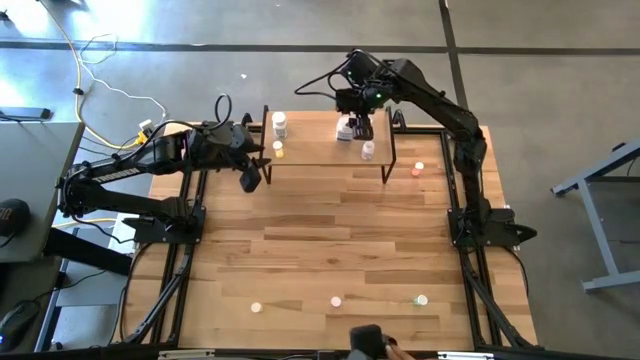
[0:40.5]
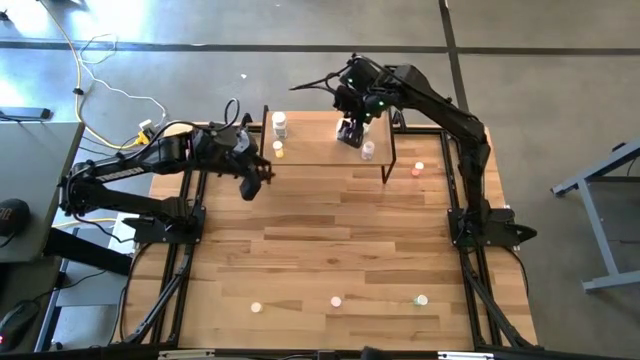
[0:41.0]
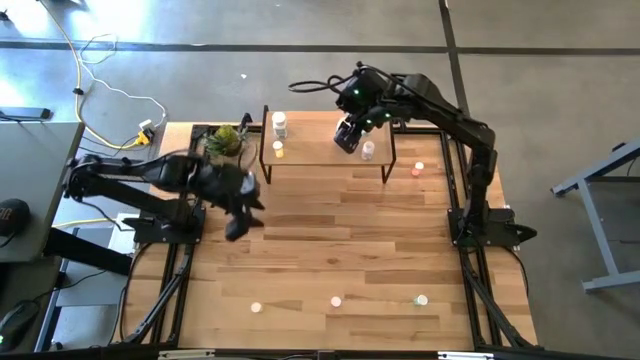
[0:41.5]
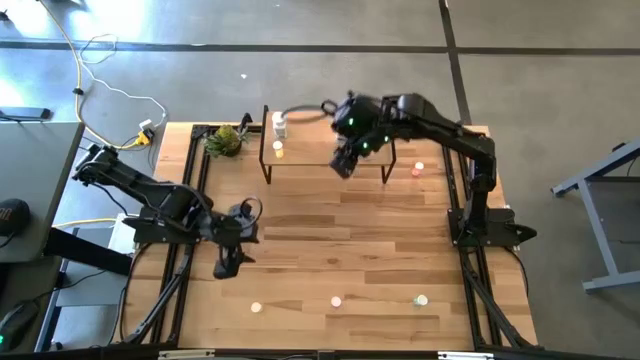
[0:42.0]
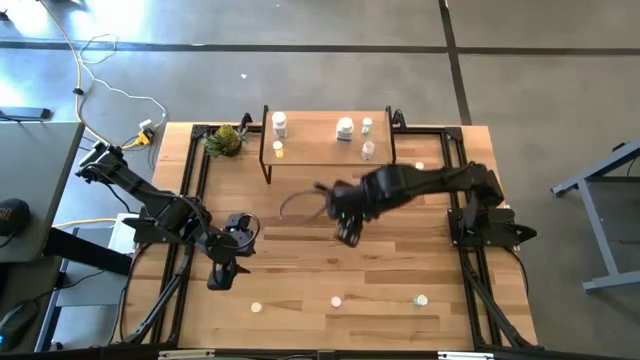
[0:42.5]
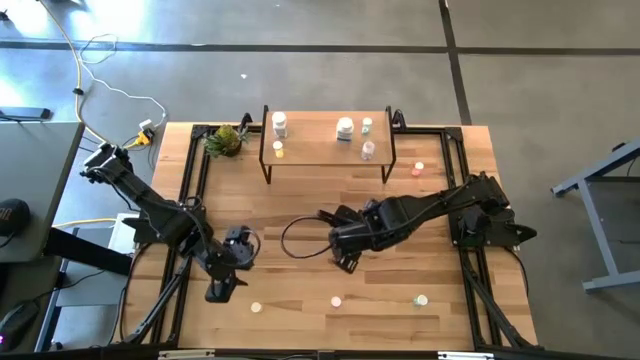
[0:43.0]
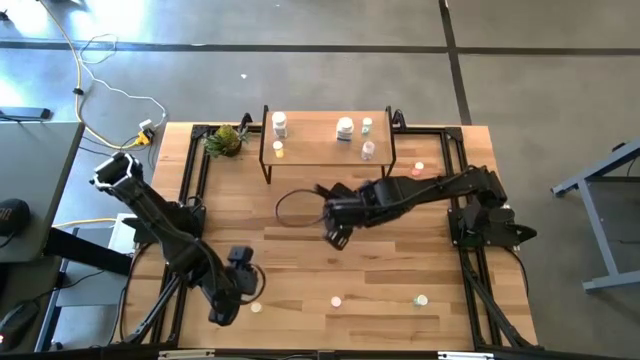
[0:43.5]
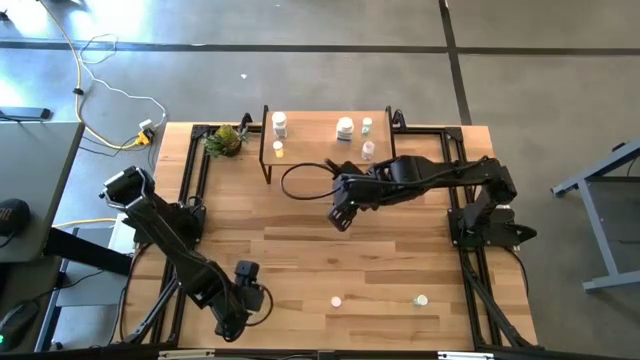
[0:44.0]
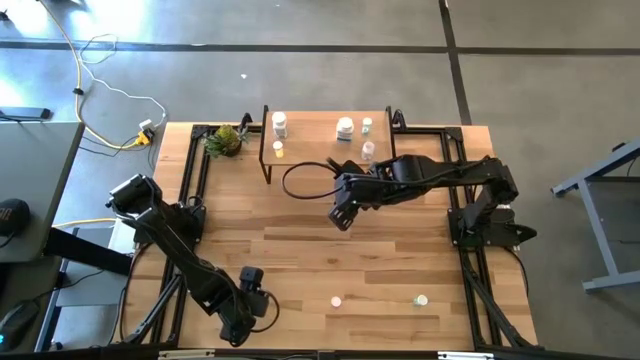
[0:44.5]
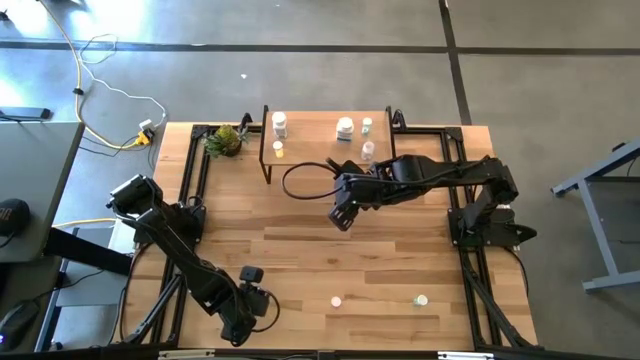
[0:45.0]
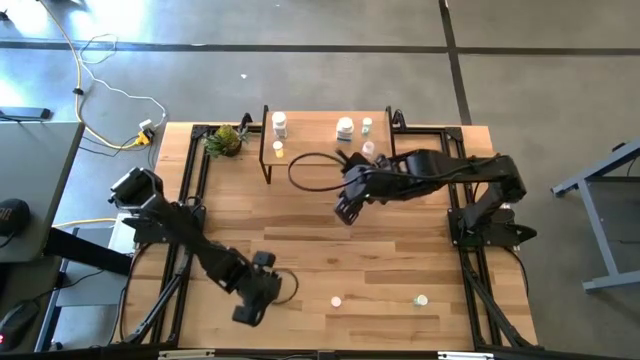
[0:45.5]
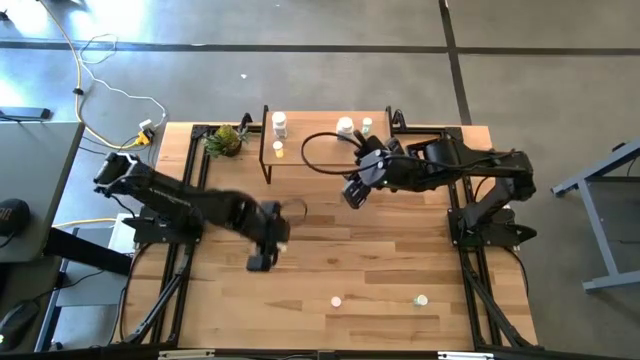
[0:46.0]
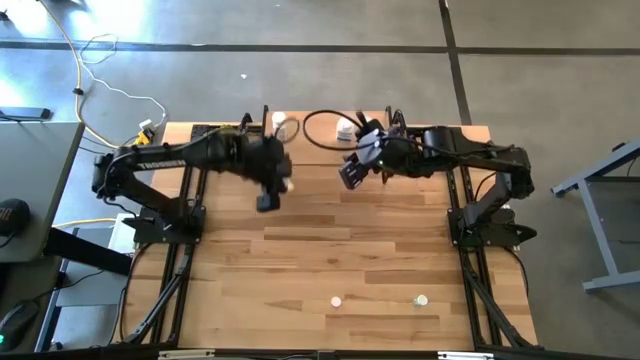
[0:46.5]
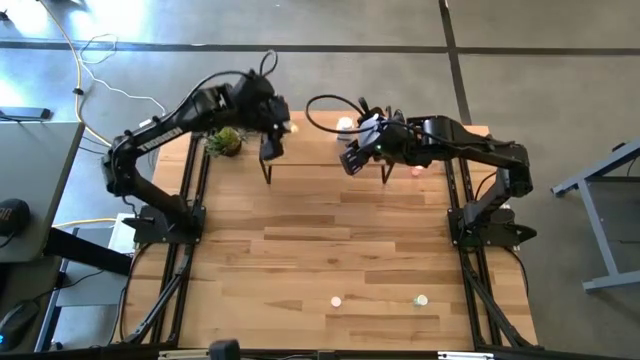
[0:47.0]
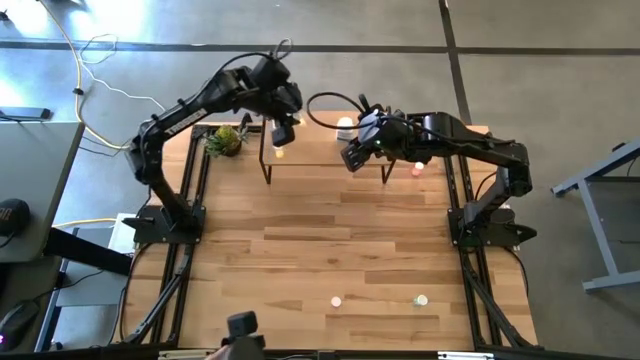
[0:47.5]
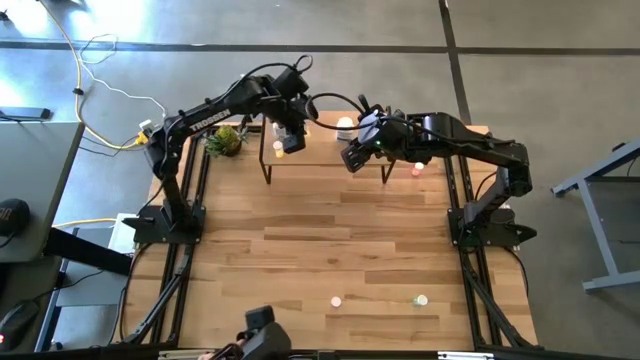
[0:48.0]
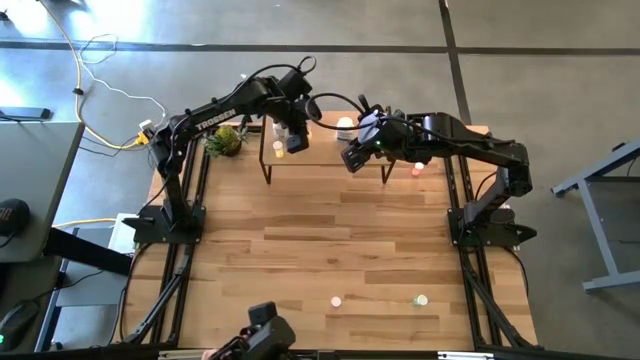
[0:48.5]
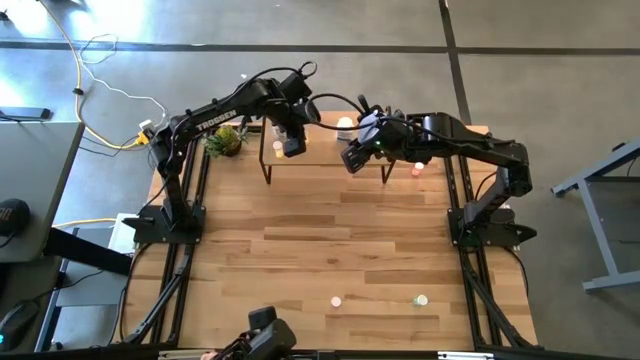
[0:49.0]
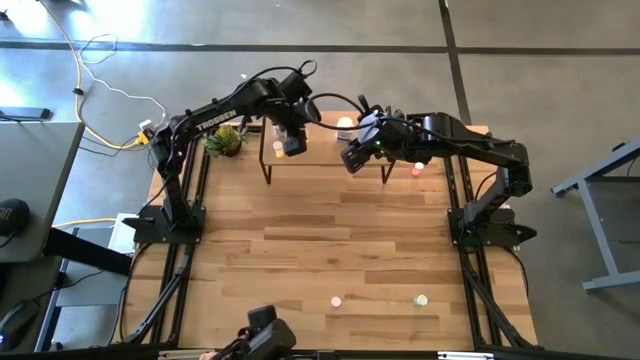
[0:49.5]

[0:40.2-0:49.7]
Task: Pick and place medicine bottles onto shelf by color
Put the yellow pill bottle on the shelf

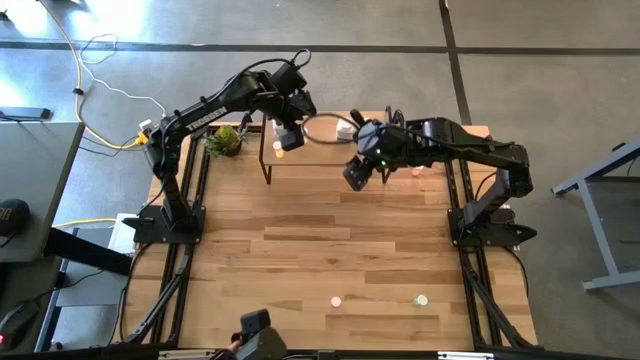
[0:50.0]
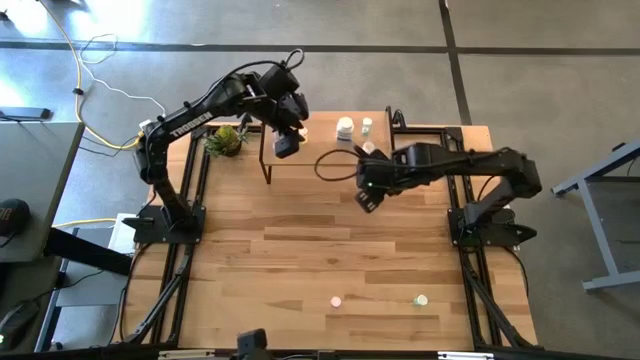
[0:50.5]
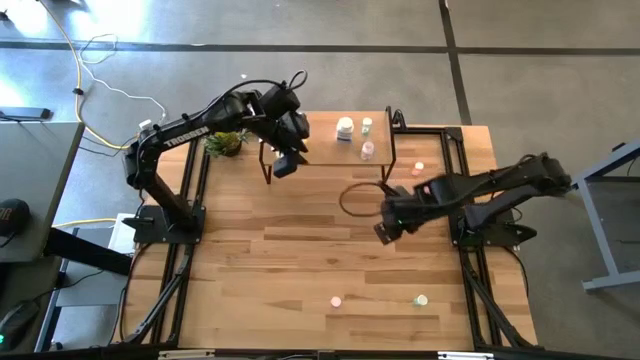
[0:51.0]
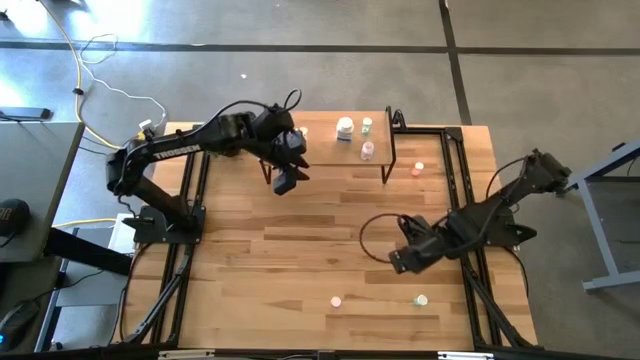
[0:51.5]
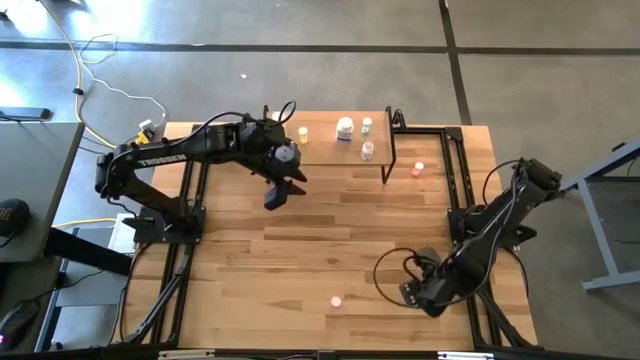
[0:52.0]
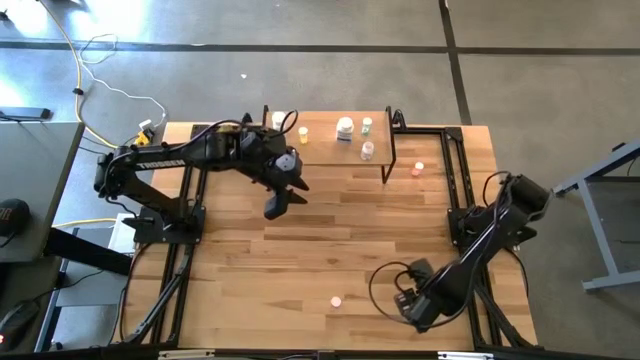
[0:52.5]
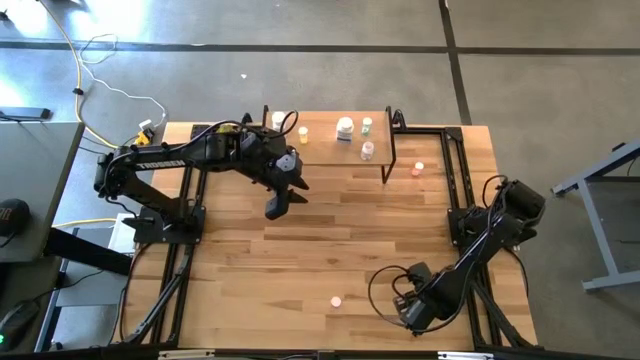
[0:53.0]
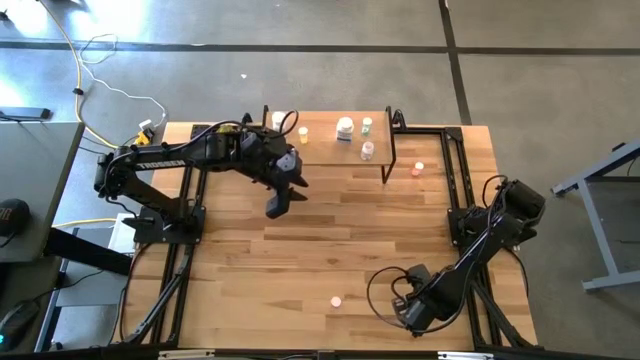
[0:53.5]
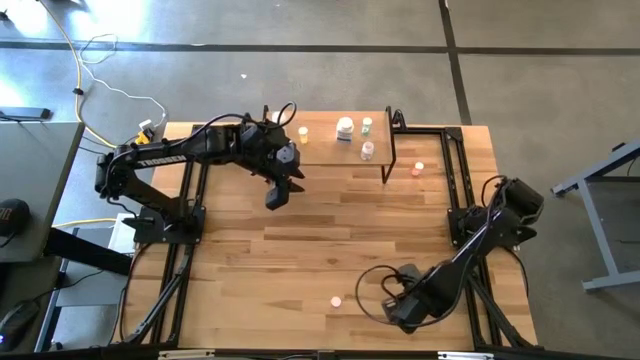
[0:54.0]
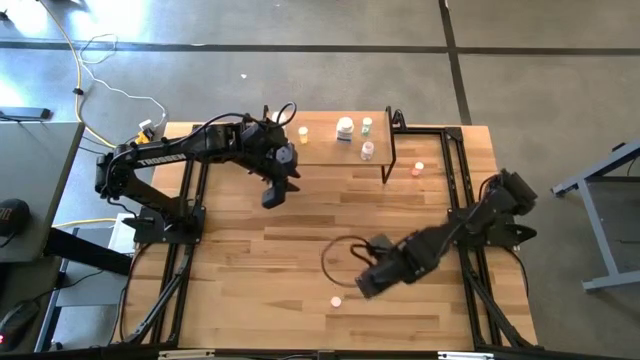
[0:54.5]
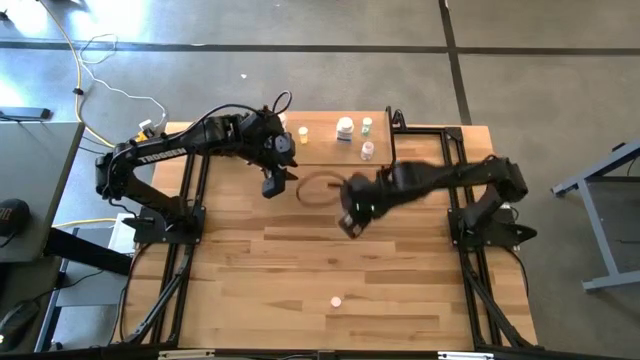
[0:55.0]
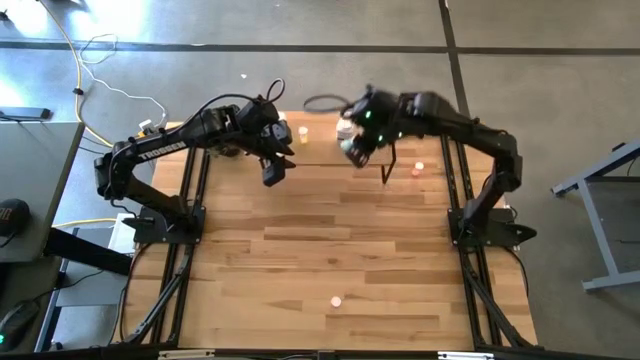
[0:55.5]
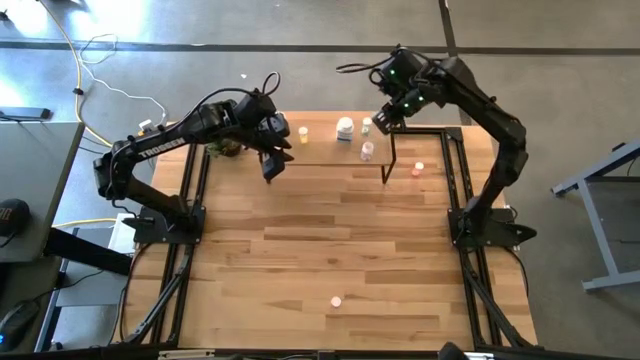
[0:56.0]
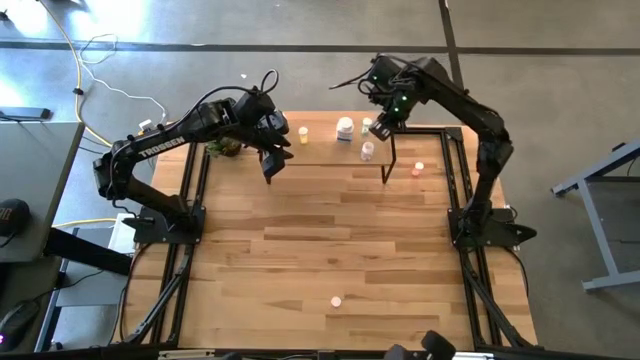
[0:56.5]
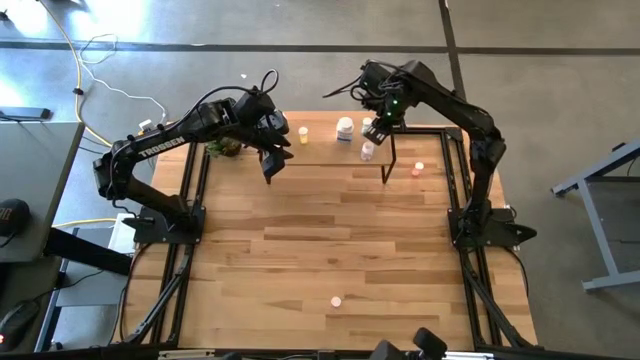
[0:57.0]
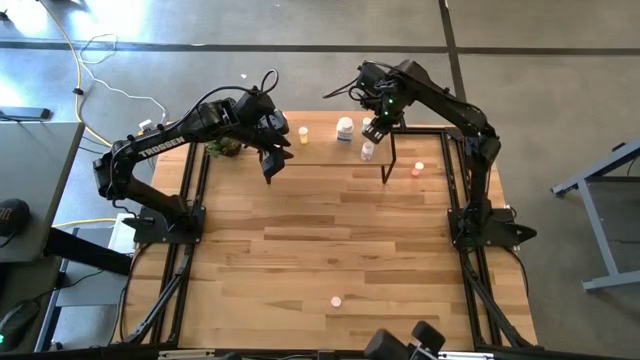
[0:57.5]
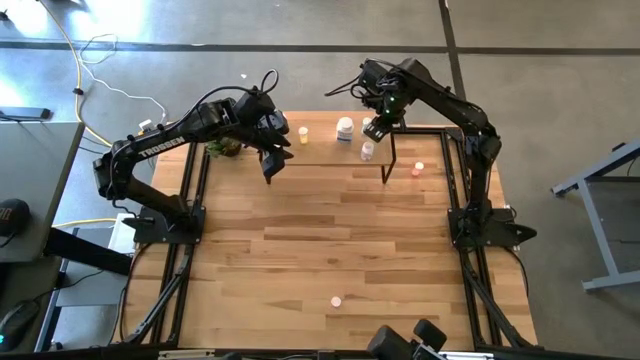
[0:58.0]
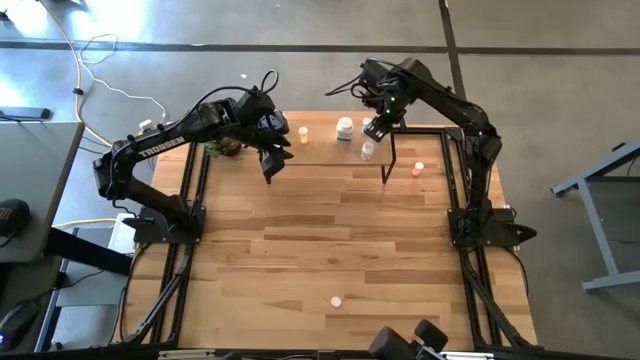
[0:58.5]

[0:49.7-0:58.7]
Put the blue pill bottle on the shelf

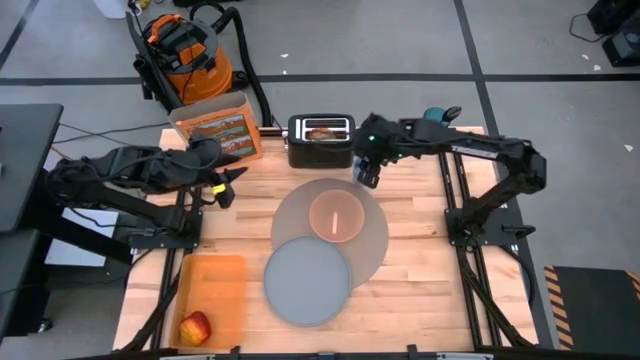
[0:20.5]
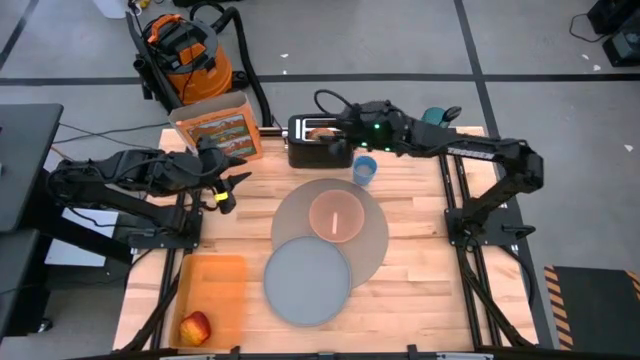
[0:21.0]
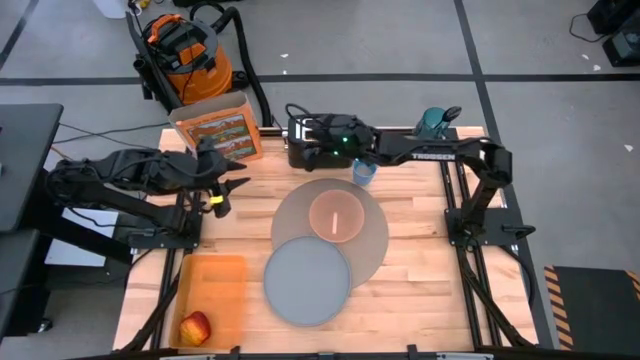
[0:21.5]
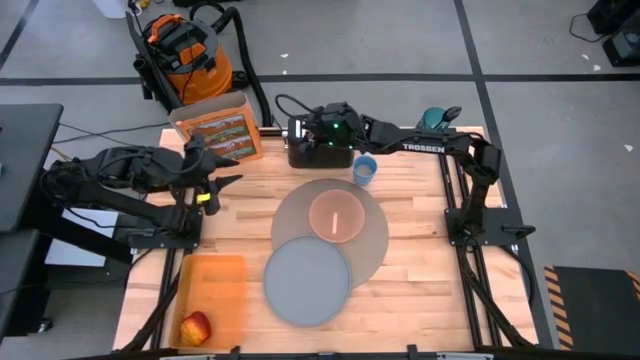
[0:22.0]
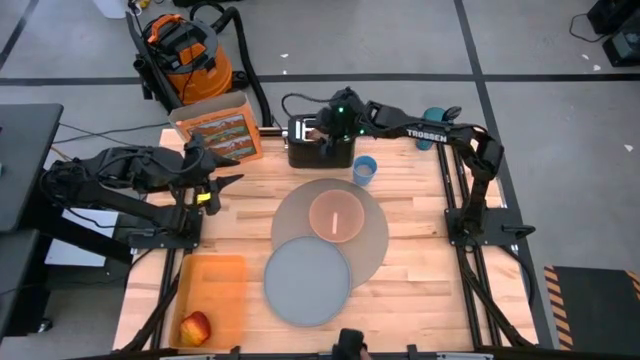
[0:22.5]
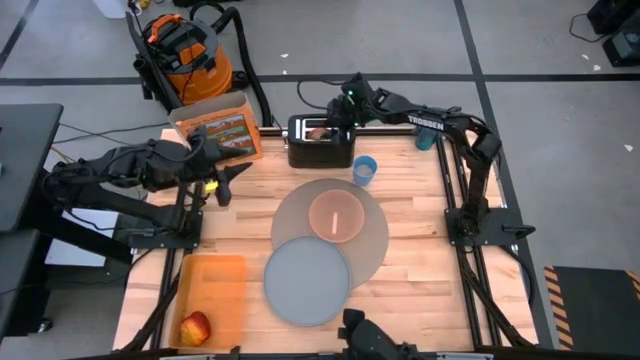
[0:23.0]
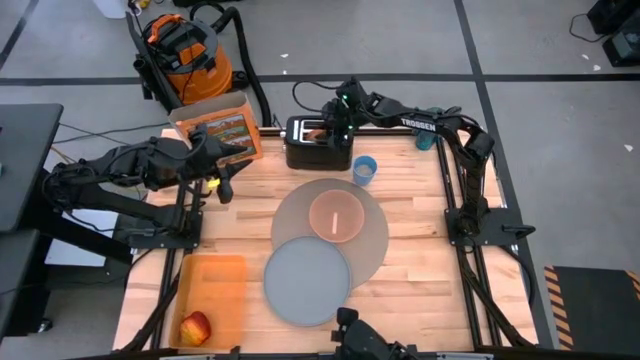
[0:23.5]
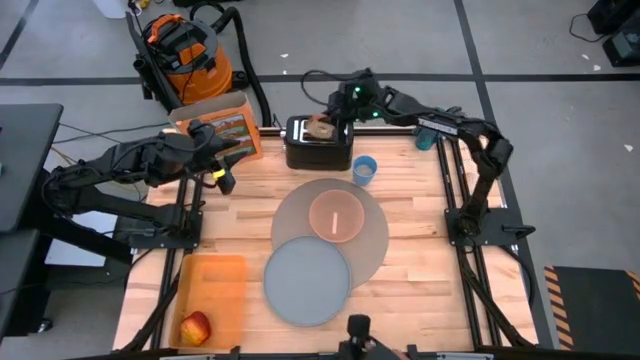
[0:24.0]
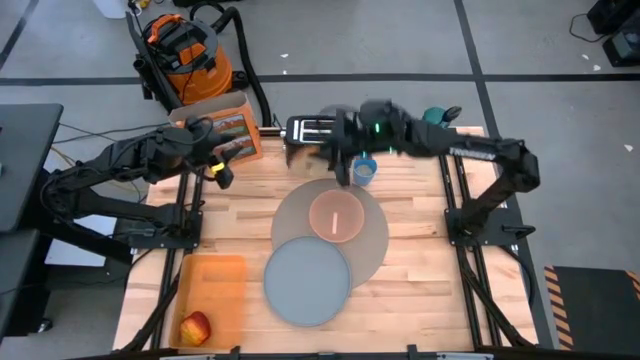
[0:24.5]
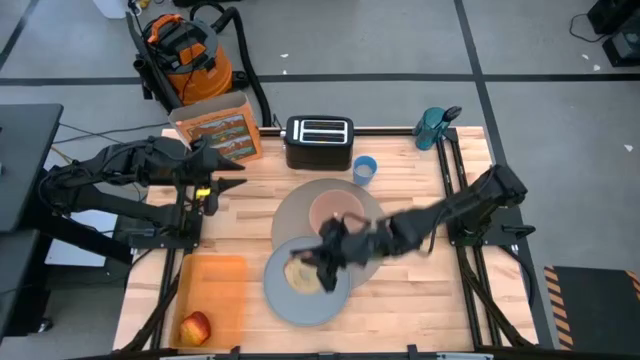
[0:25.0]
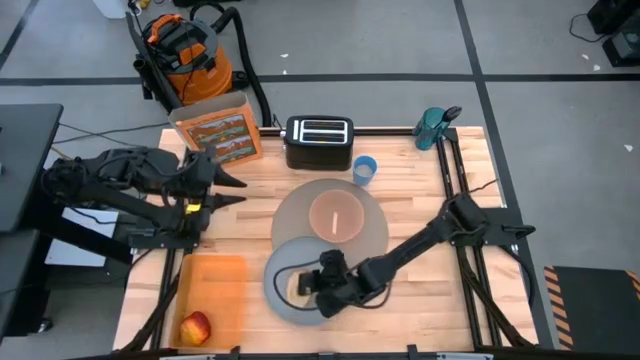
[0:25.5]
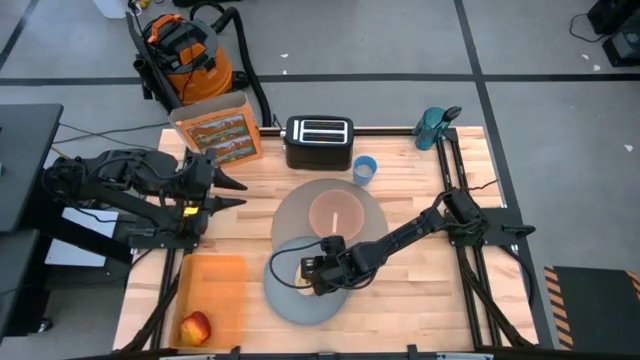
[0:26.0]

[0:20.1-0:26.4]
Task: Arrange a breakfast setting
Put the toasted bagel from the toaster on the blue plate
